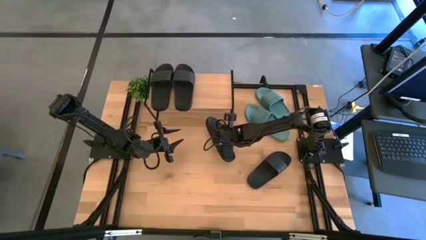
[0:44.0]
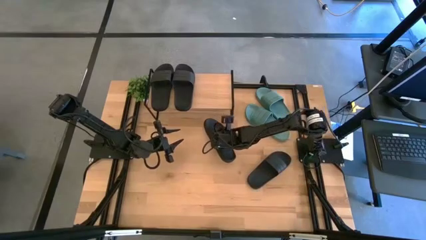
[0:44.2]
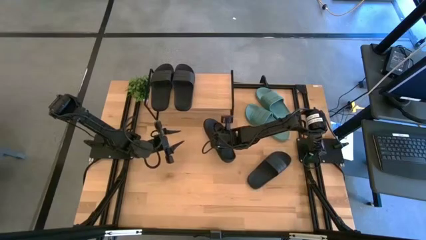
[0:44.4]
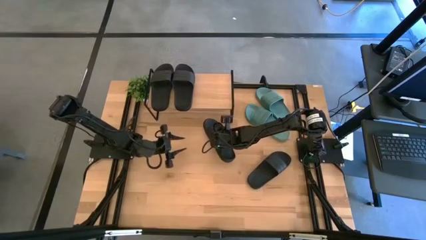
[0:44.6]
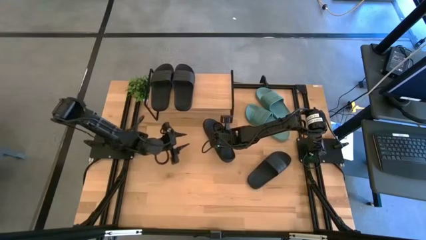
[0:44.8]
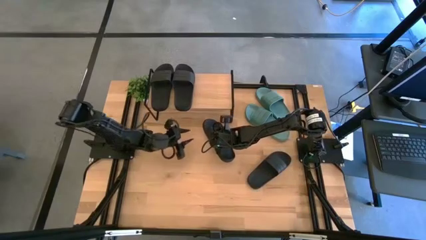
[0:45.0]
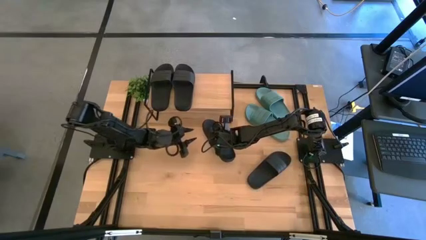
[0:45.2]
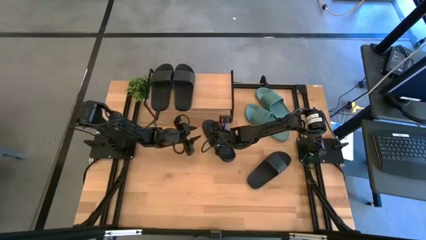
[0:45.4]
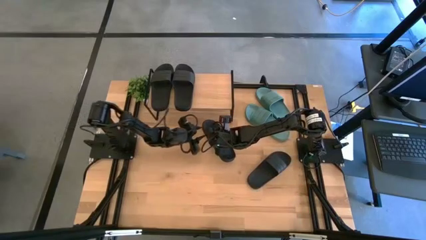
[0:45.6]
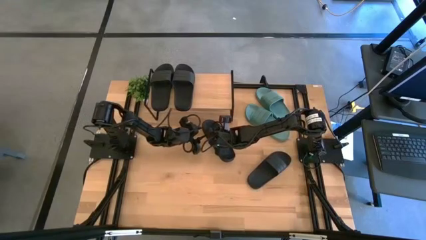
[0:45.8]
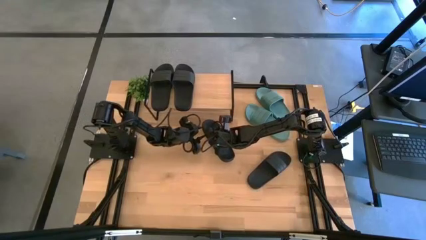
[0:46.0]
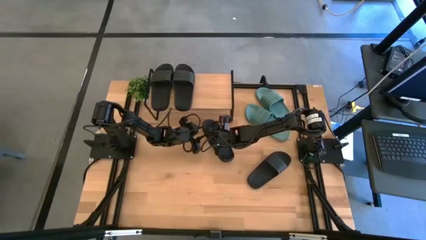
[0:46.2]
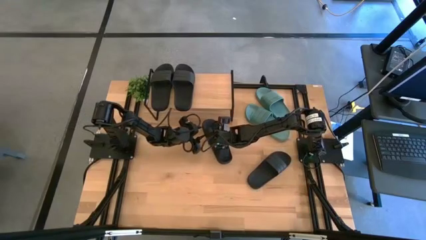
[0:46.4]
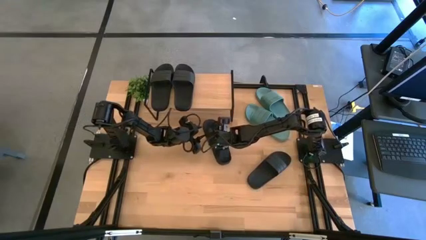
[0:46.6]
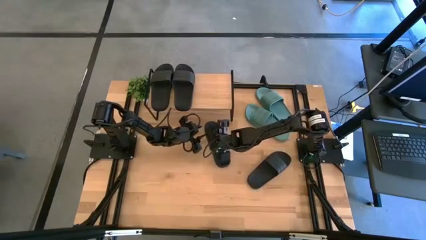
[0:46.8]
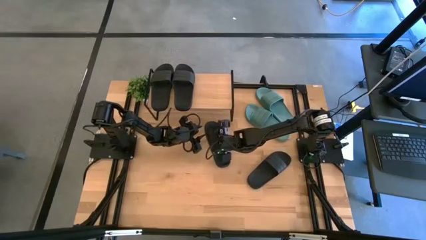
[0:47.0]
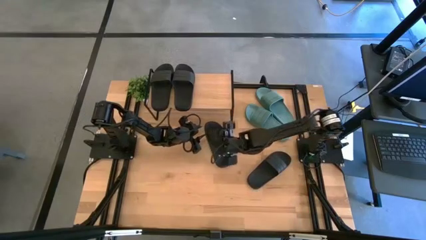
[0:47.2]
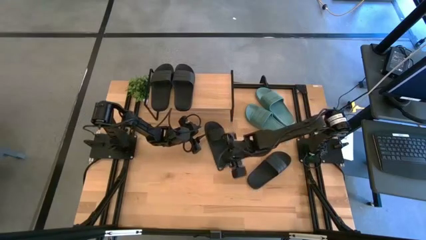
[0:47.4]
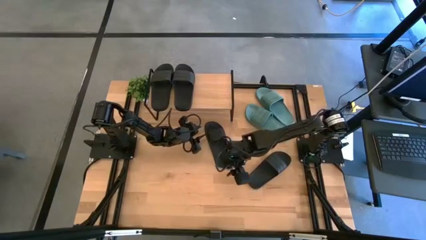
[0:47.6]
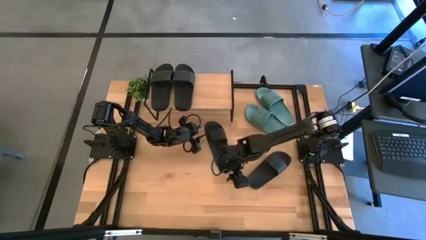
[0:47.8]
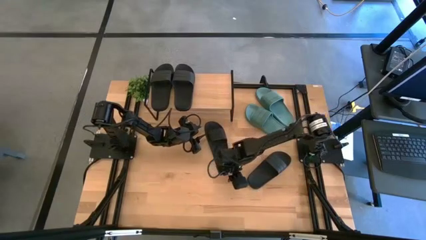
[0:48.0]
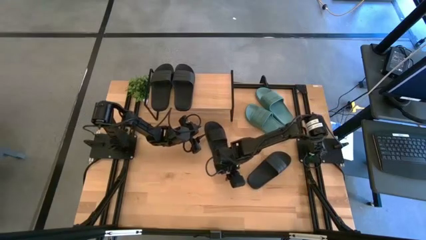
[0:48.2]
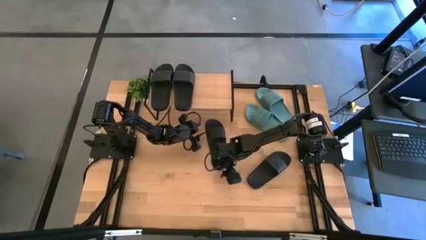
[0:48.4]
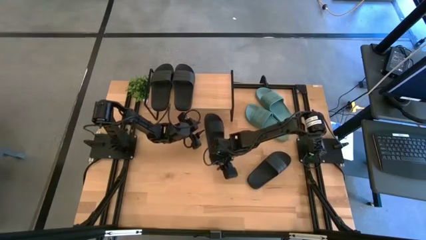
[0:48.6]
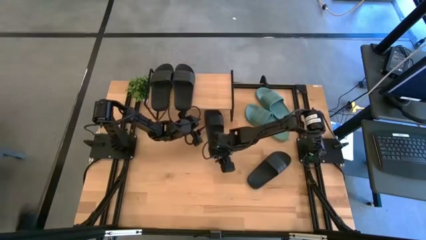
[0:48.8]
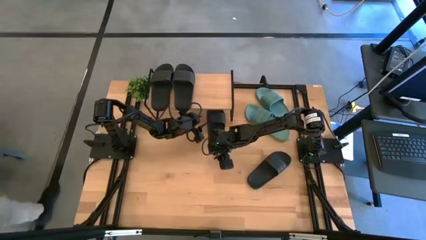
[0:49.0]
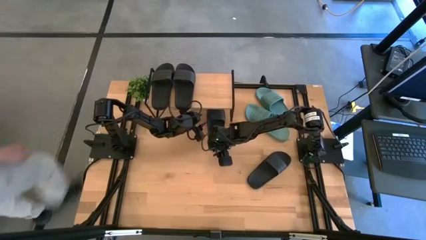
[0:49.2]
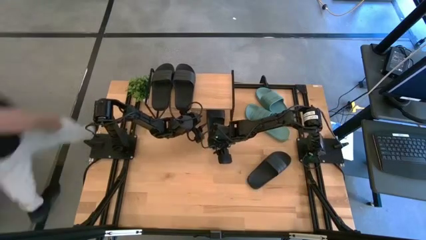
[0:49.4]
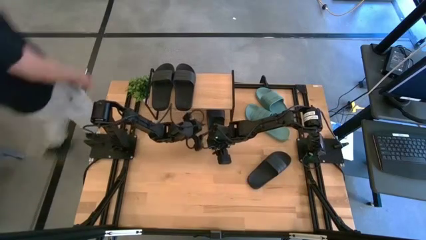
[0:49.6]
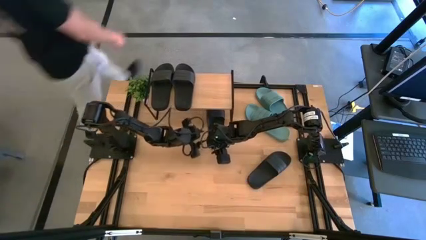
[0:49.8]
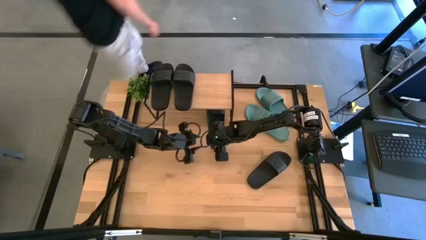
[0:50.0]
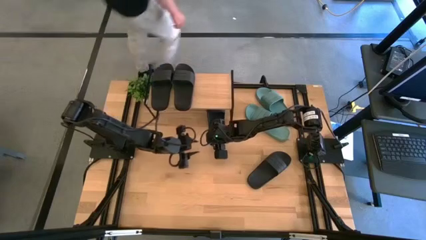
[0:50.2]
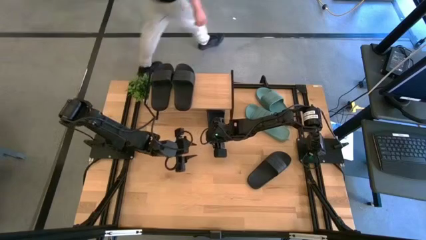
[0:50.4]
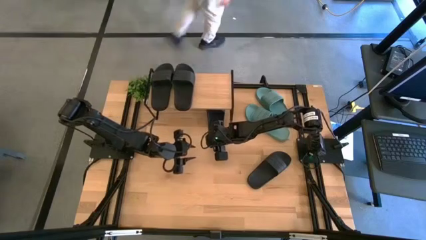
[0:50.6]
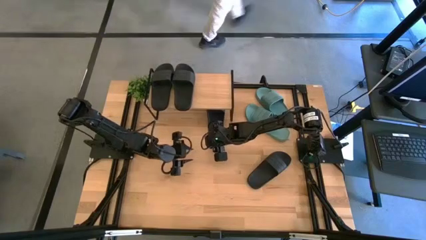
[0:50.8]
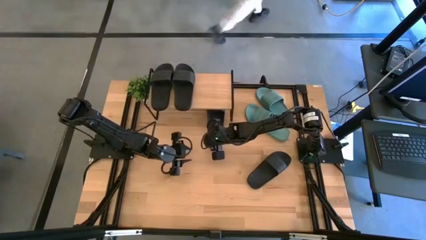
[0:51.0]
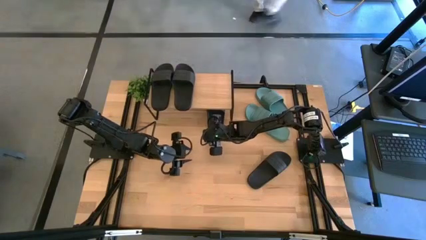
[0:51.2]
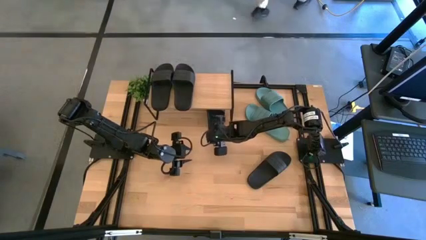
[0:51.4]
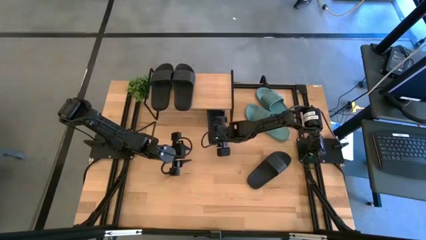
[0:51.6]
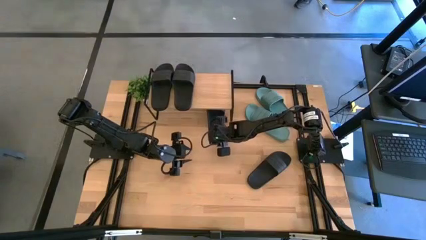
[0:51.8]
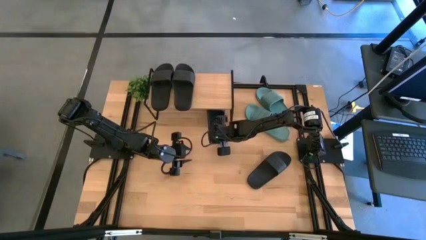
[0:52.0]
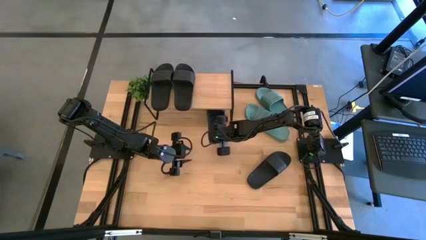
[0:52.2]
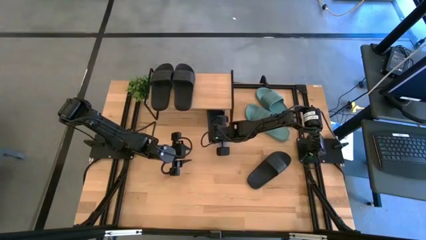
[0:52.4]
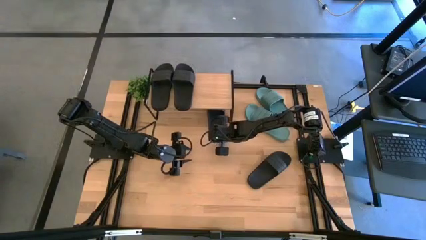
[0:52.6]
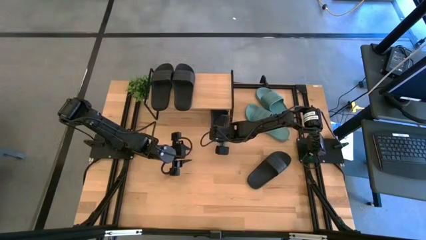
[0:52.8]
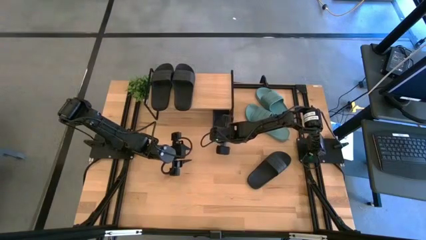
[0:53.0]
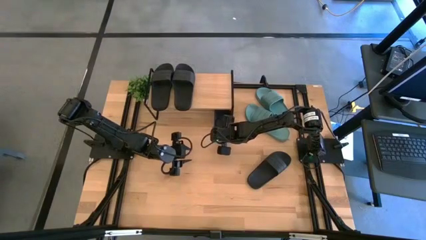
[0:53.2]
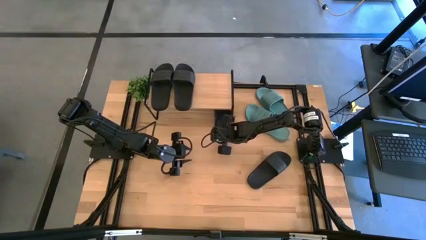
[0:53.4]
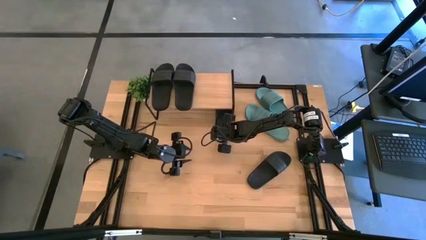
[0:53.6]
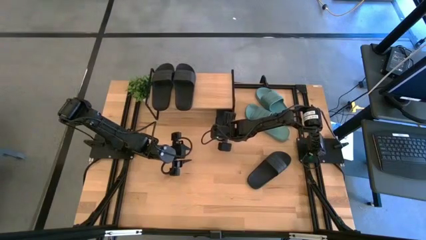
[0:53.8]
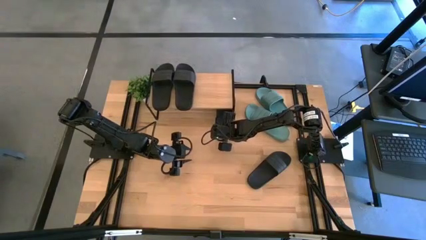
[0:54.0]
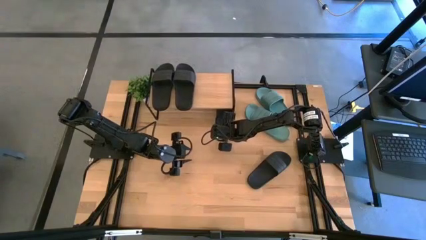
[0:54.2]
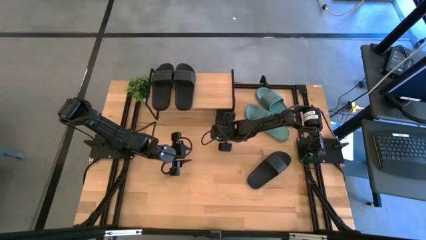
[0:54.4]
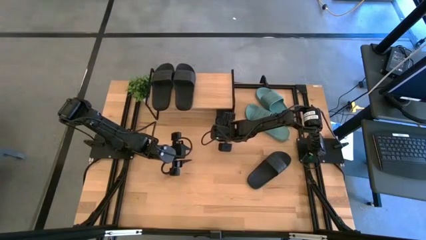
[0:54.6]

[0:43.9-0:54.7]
Task: Pick and place slides into the shelf
Put the black slipper under the shelf
